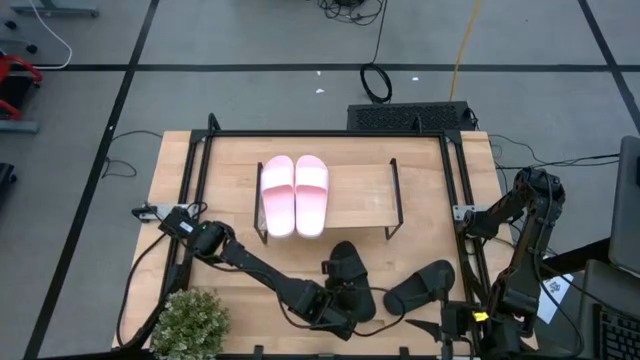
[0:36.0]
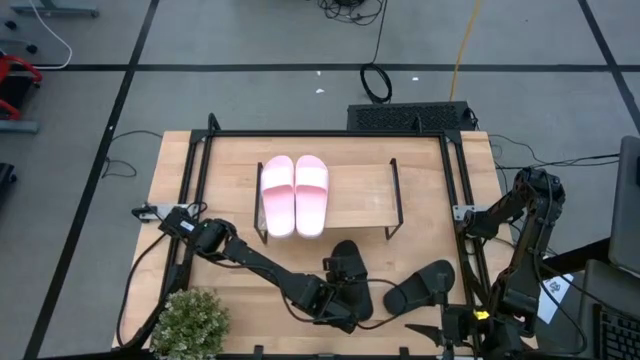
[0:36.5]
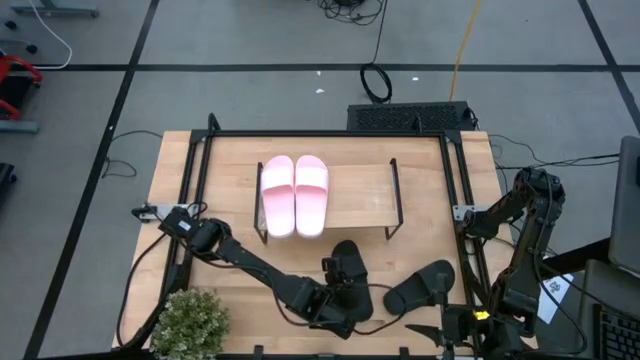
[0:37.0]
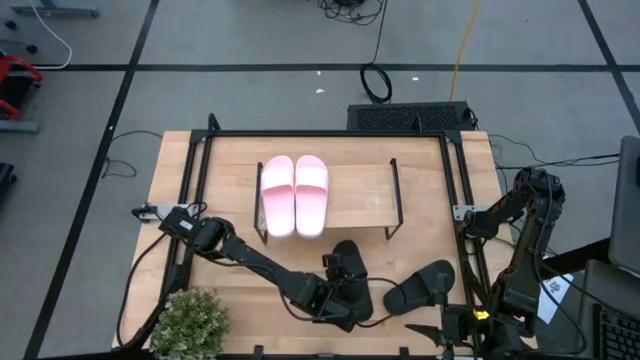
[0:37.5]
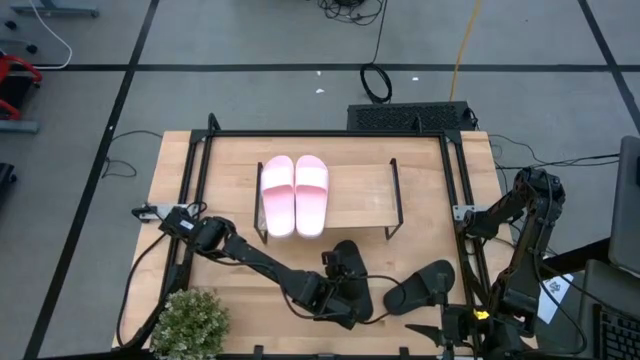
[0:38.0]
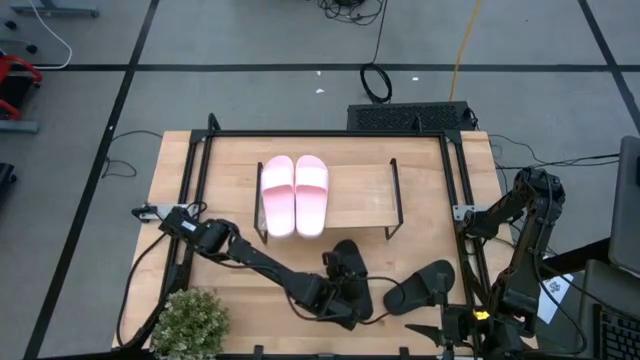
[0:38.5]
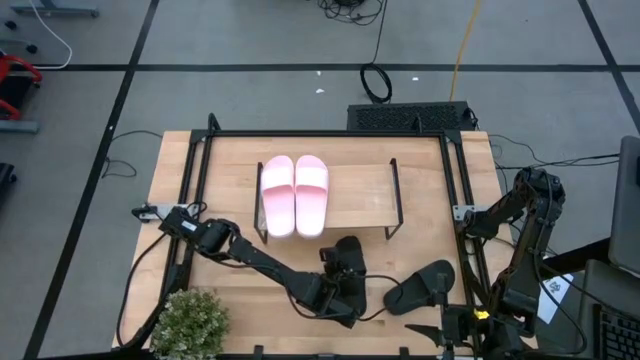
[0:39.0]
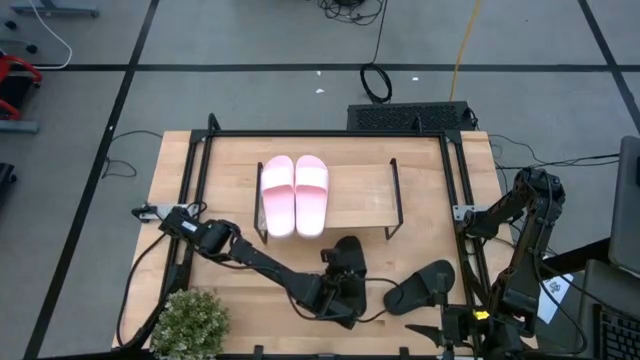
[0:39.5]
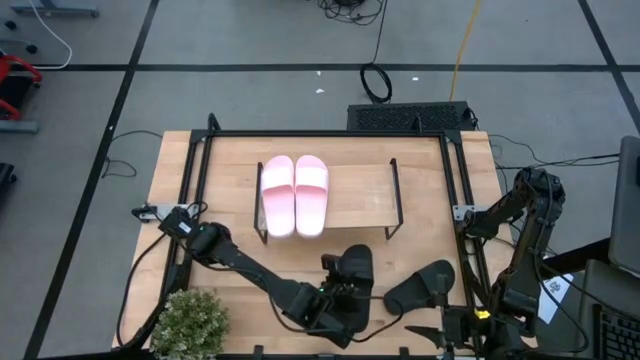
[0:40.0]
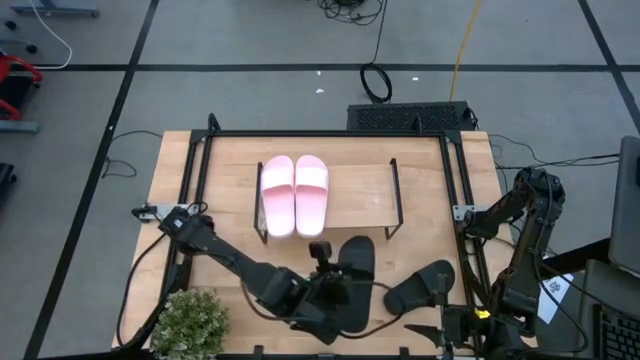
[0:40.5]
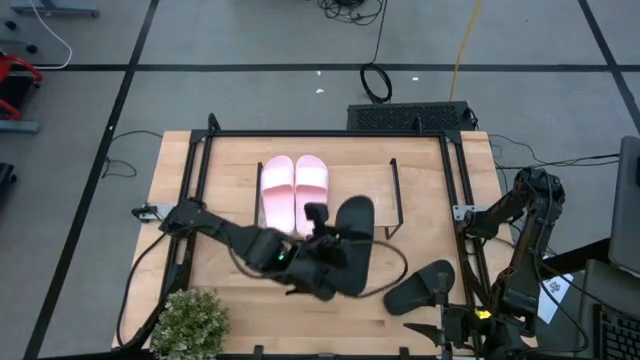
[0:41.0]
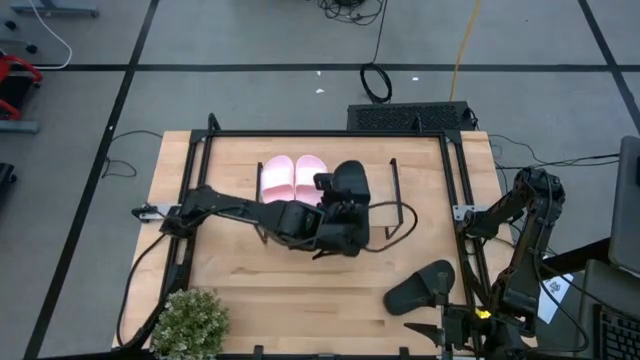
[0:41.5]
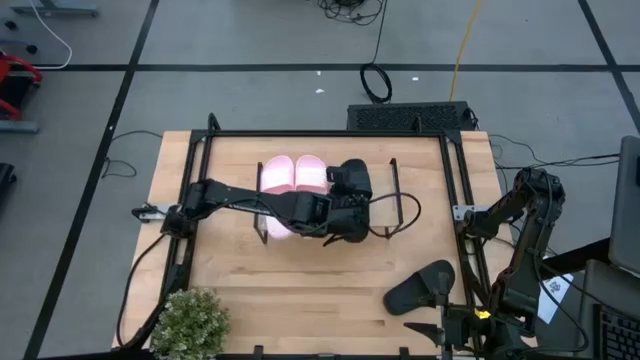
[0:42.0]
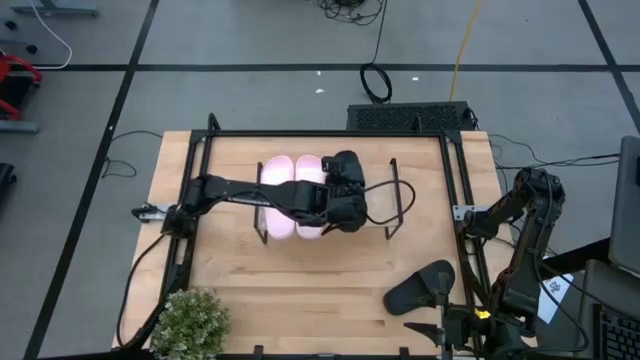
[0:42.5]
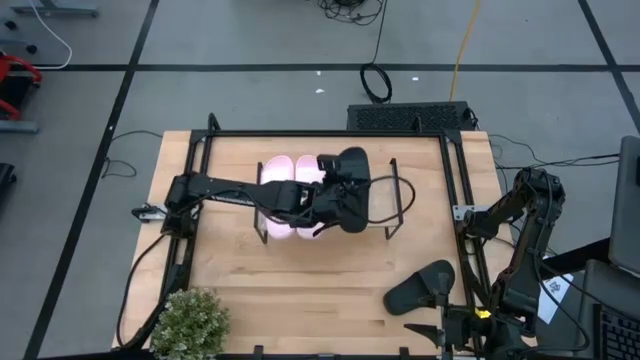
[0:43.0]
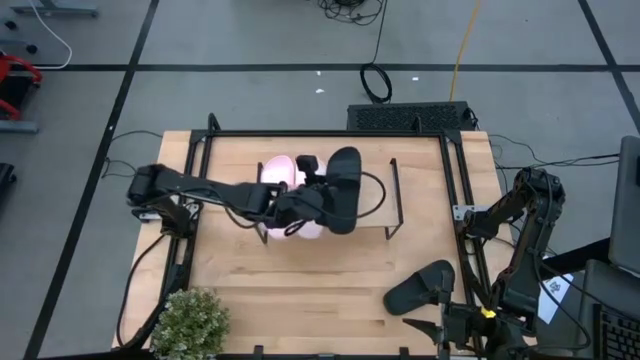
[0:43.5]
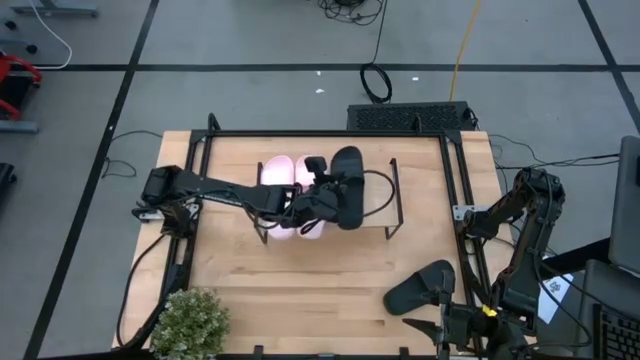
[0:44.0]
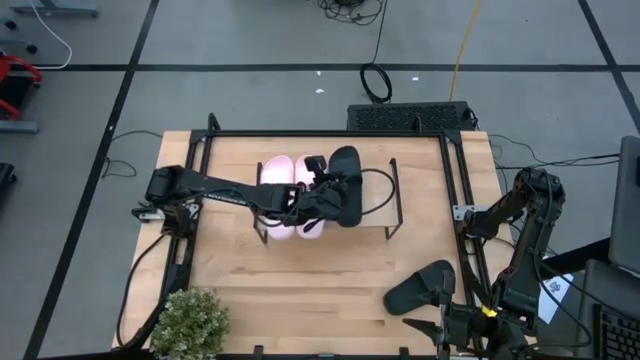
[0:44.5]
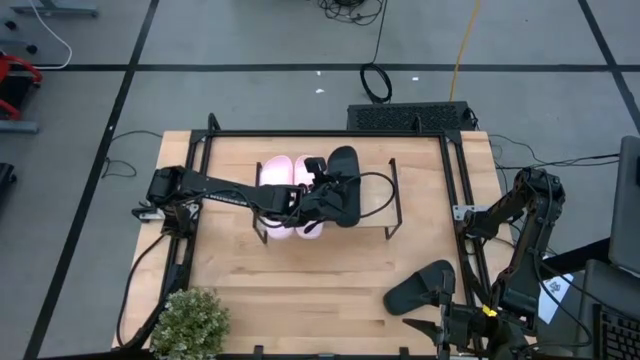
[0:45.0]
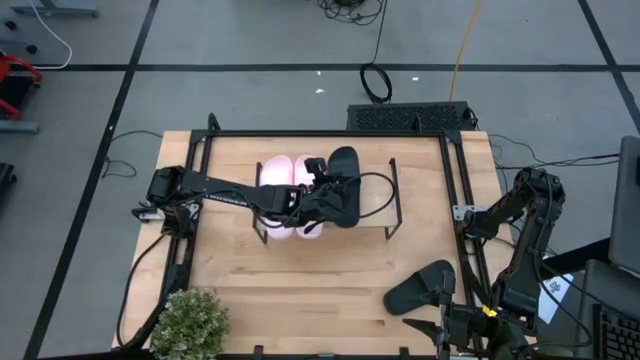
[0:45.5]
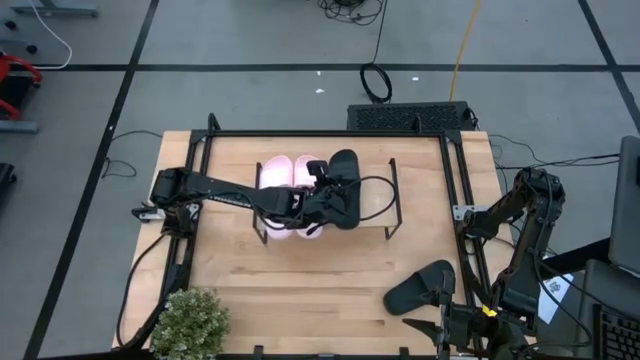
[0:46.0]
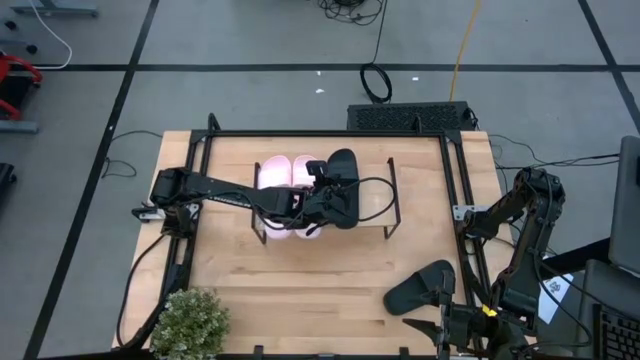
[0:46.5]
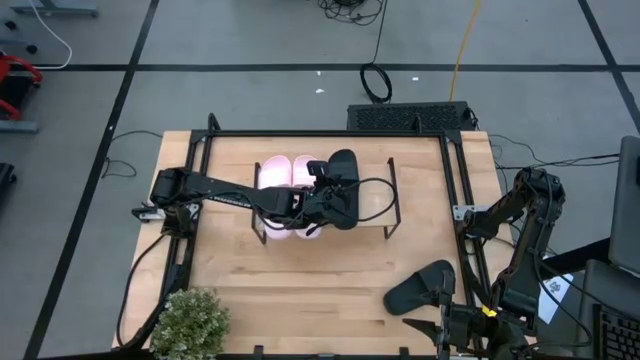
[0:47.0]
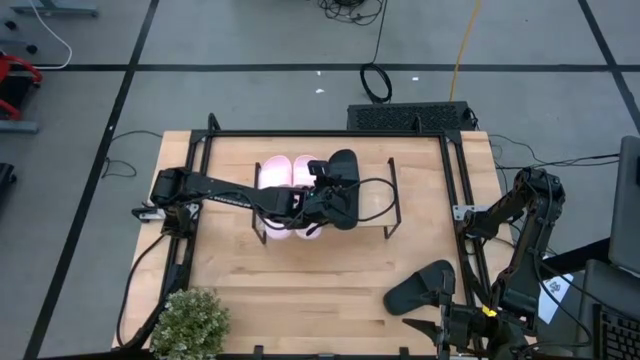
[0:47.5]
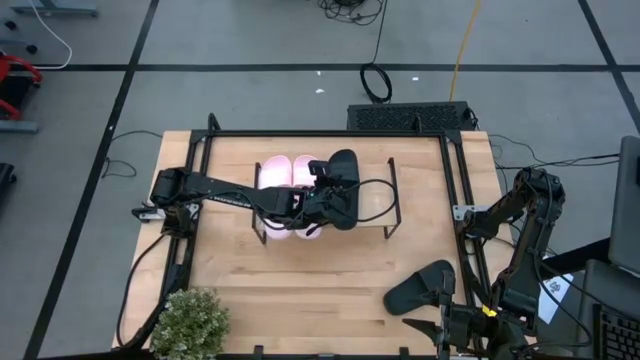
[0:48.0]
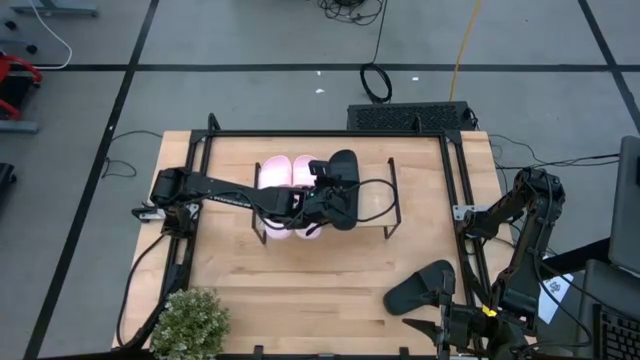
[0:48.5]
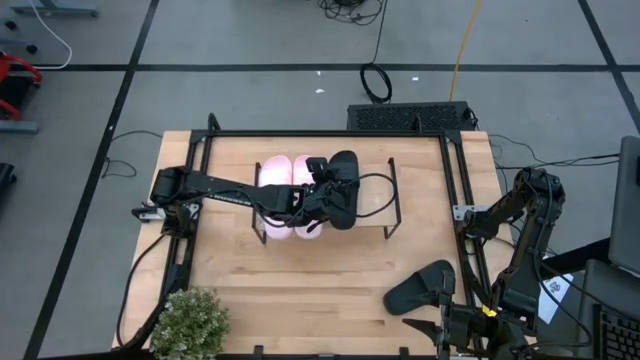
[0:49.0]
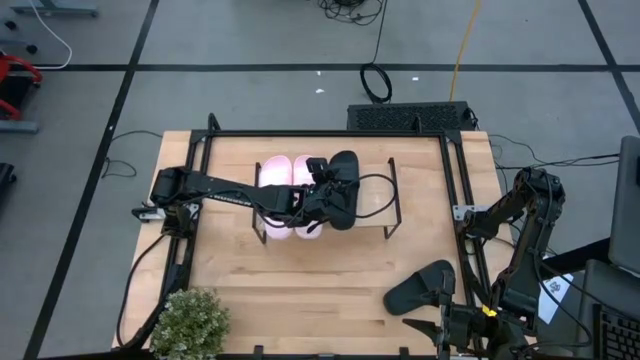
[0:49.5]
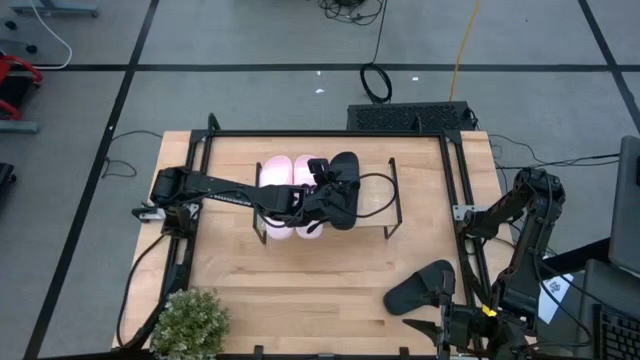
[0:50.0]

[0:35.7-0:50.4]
Task: Pick and place slides into the shelf
Put the left black slipper on the shelf
